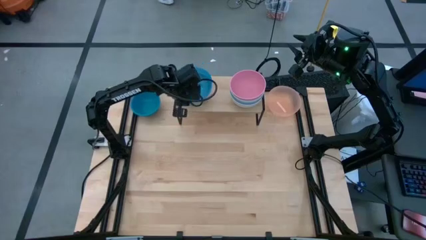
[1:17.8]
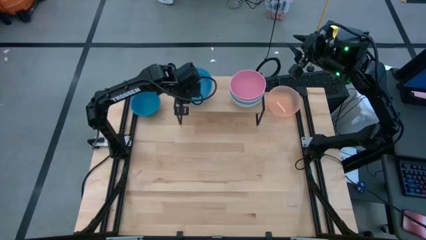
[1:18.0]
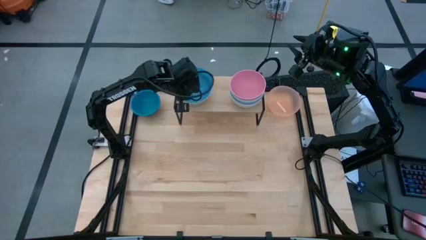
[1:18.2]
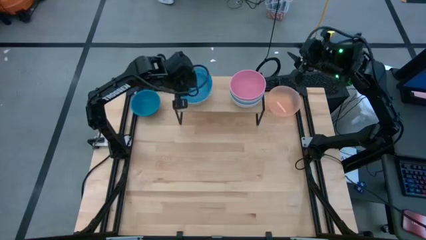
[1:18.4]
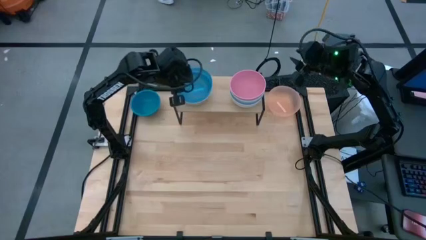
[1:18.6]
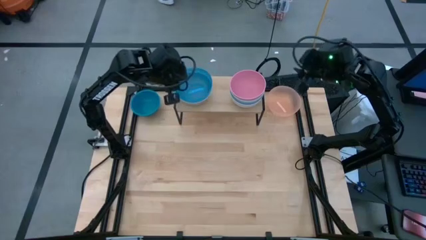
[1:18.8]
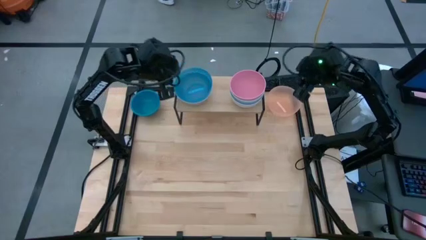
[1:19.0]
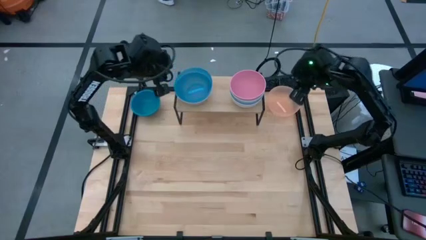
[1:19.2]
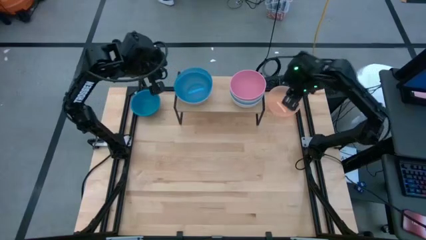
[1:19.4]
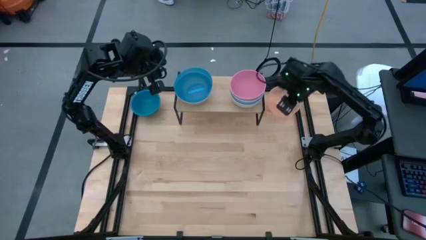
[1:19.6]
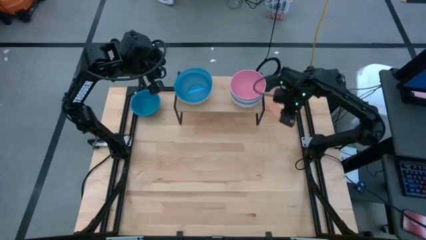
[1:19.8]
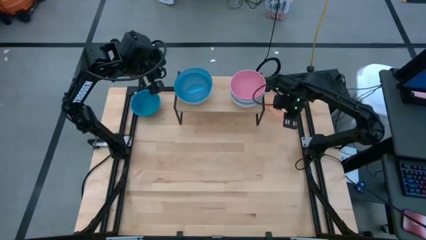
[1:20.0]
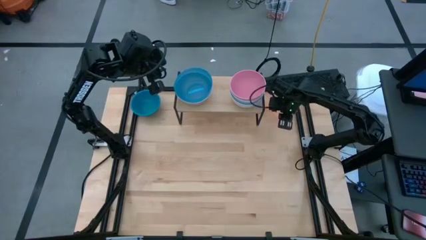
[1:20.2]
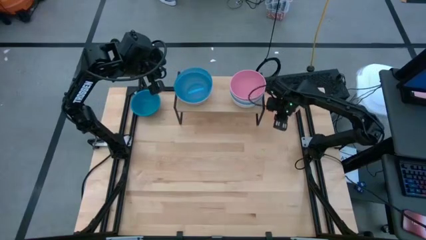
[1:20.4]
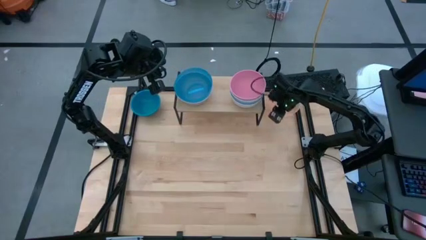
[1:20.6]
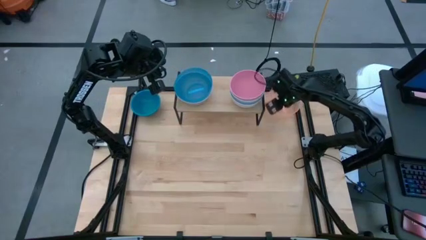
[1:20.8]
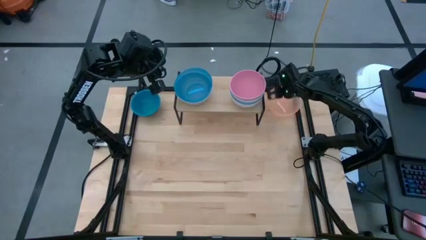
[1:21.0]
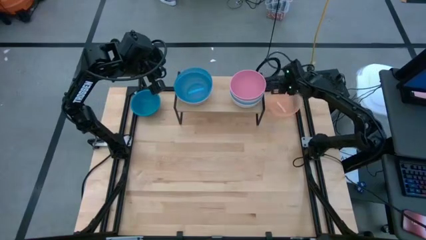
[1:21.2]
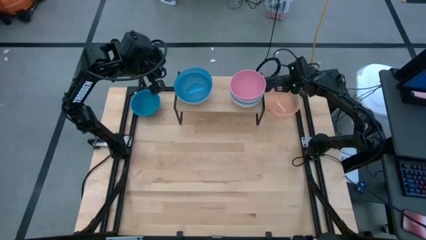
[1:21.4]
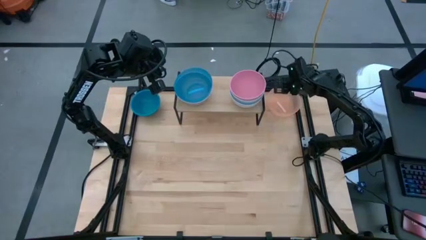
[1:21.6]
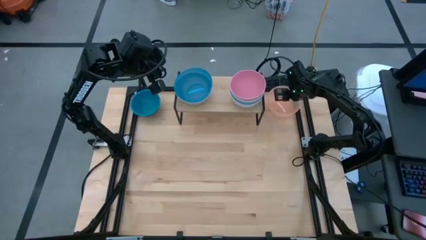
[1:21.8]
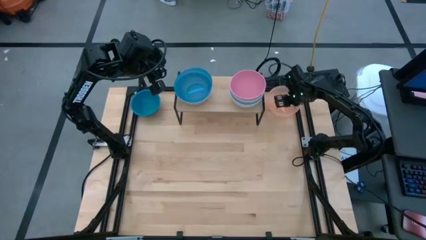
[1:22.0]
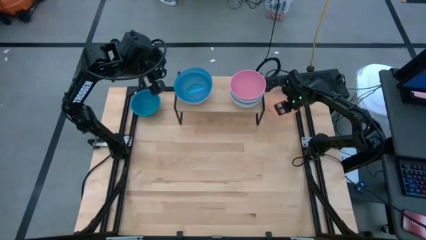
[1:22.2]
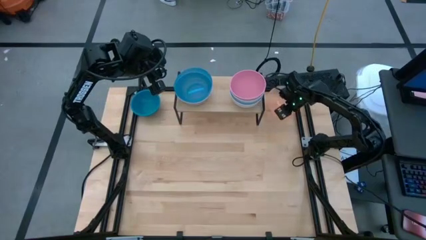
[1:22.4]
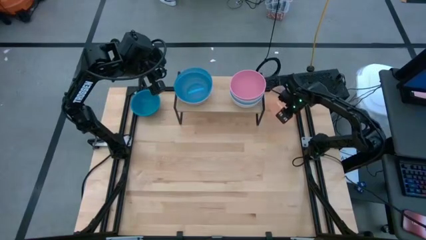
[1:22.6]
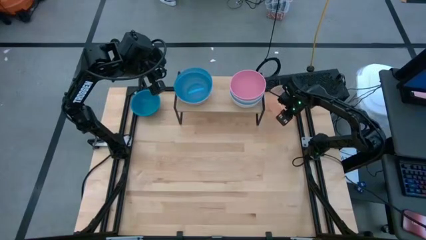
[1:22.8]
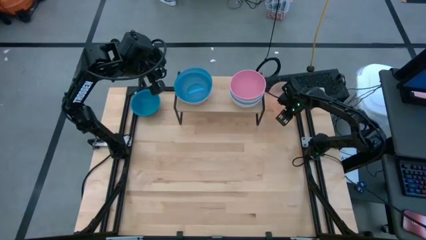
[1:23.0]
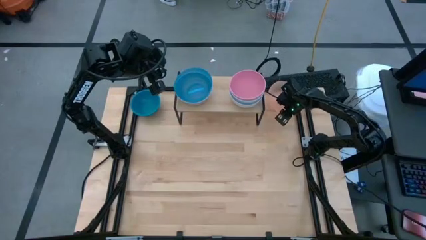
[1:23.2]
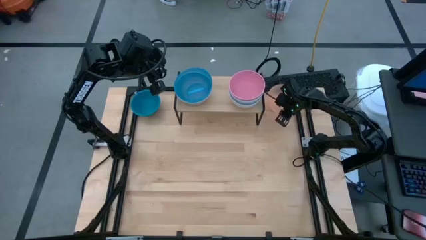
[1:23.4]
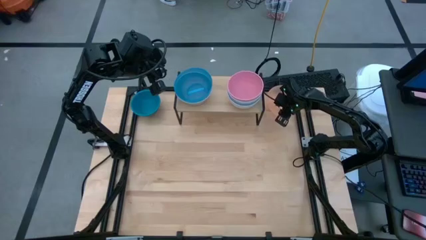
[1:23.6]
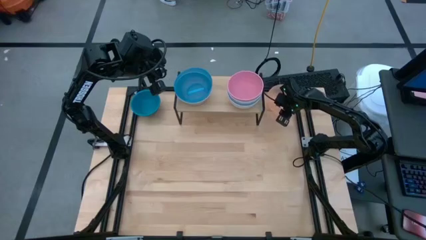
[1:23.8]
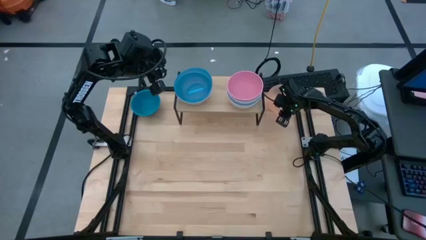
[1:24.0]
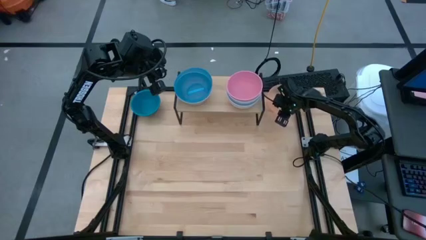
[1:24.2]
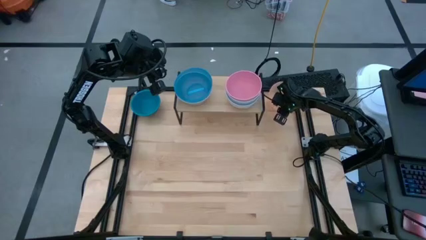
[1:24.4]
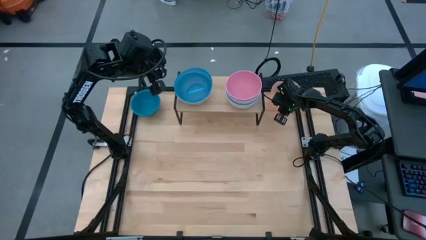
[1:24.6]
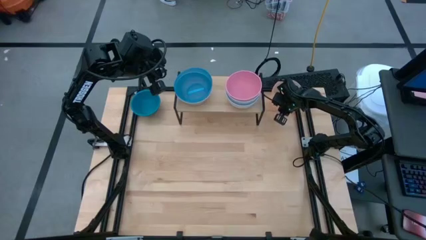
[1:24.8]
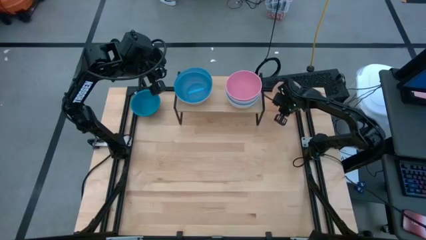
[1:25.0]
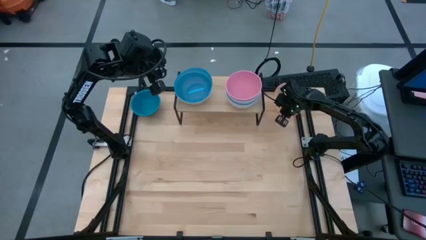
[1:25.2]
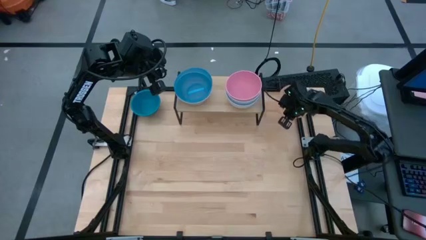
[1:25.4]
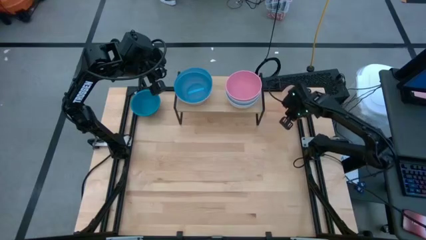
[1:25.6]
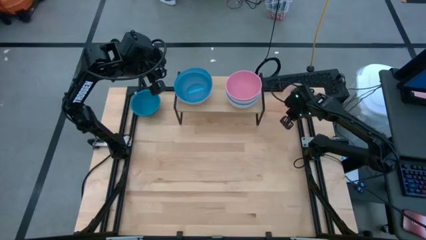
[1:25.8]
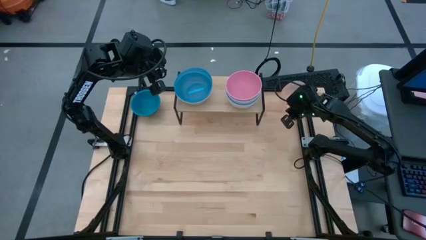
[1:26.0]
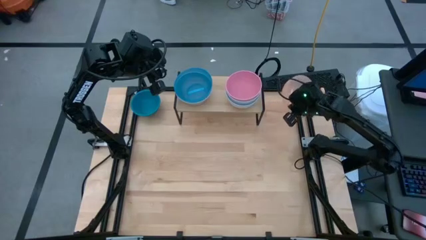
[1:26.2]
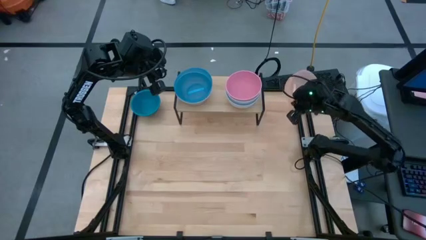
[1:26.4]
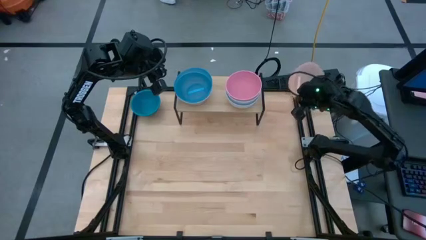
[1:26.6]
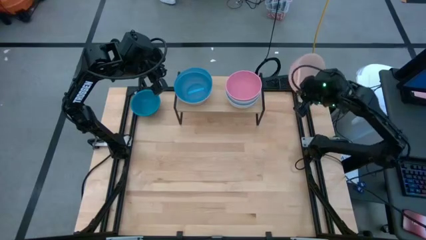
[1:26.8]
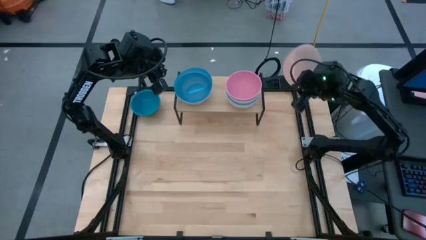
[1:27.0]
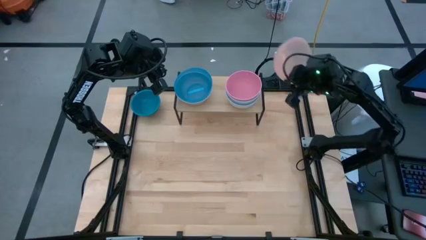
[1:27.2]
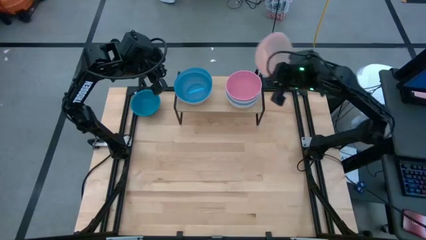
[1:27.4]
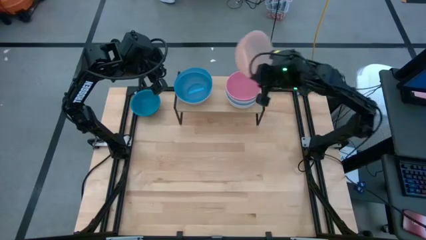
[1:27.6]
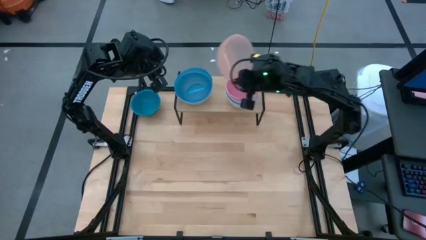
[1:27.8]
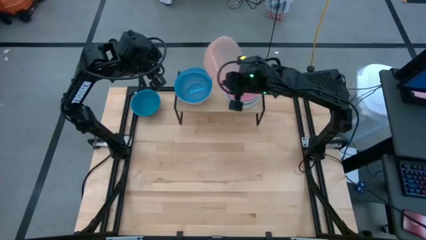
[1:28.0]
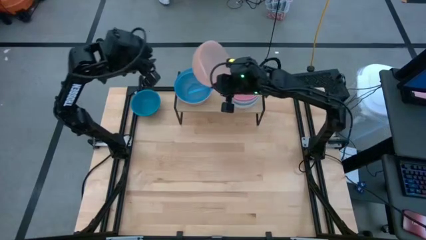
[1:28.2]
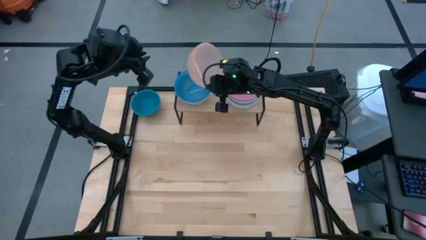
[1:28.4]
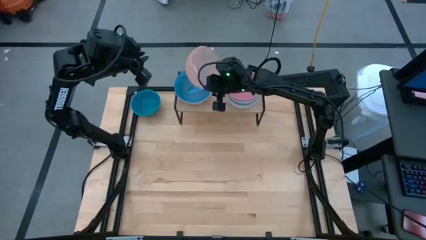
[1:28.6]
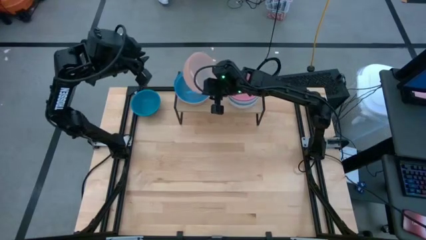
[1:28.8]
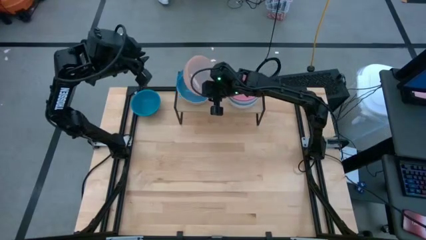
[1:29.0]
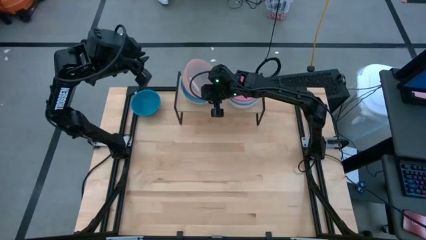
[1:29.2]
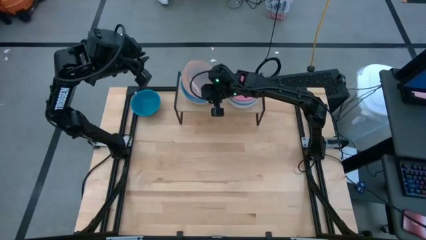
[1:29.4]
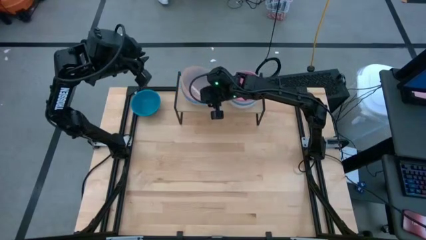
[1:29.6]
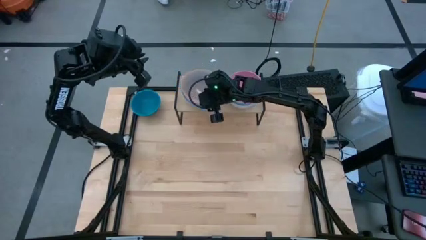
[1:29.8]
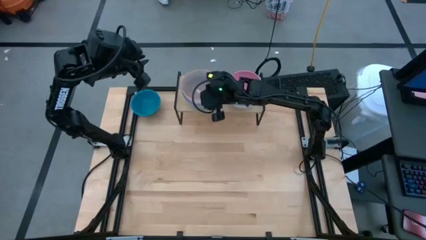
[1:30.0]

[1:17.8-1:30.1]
Task: Place and stack bowls onto a shelf
Stack the light pink bowl on top of the light blue bowl on the shelf

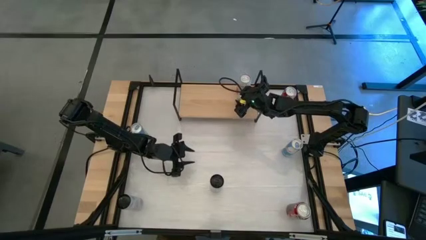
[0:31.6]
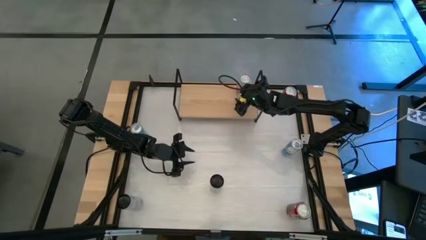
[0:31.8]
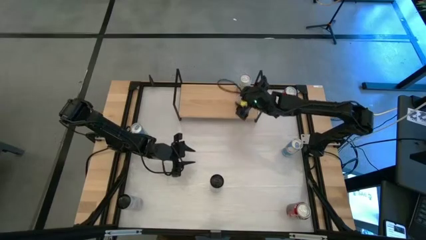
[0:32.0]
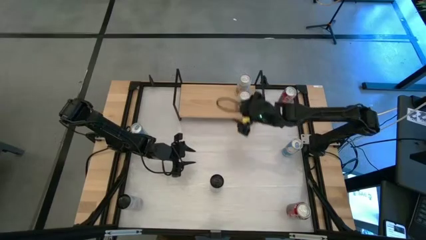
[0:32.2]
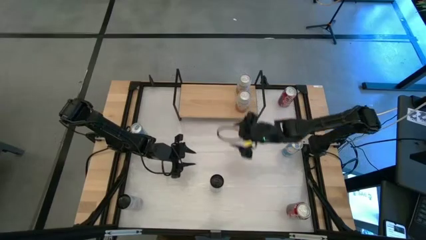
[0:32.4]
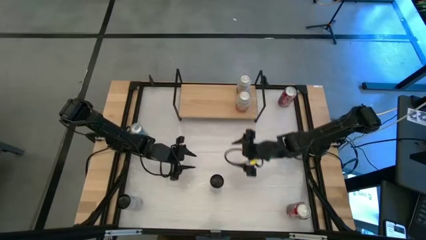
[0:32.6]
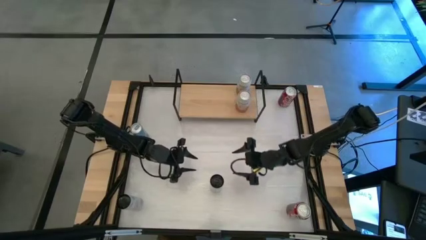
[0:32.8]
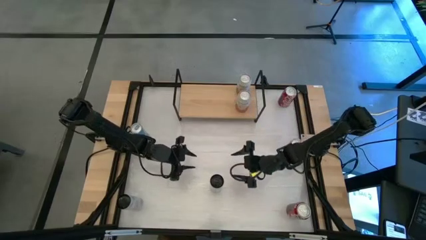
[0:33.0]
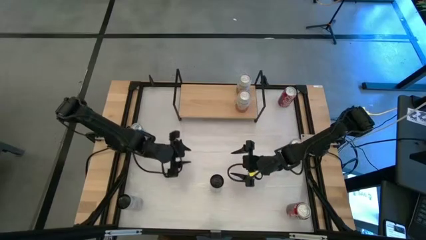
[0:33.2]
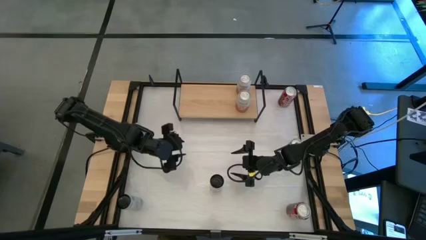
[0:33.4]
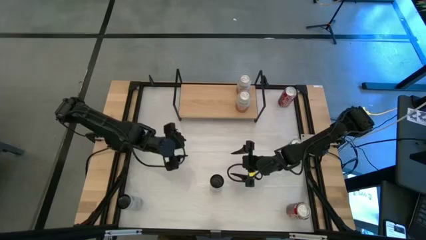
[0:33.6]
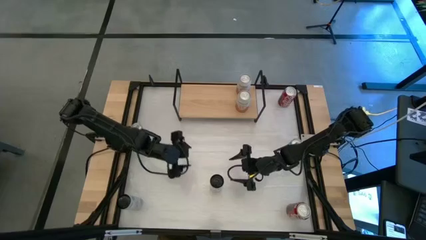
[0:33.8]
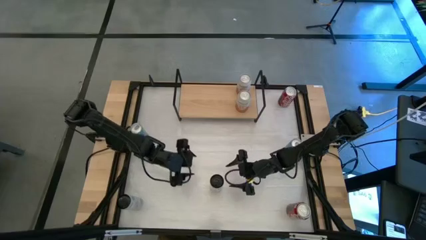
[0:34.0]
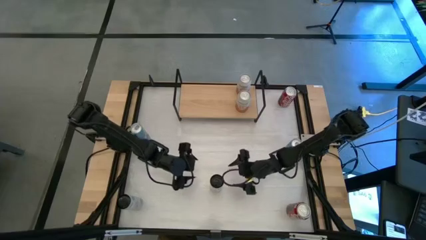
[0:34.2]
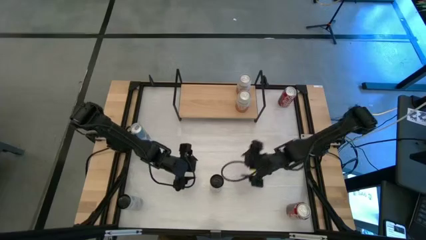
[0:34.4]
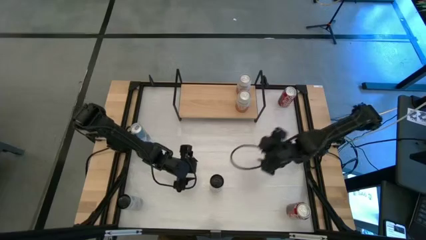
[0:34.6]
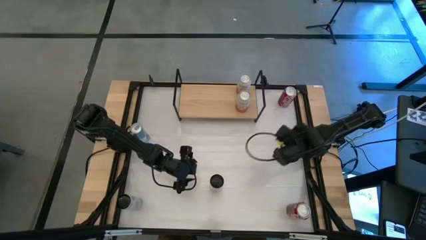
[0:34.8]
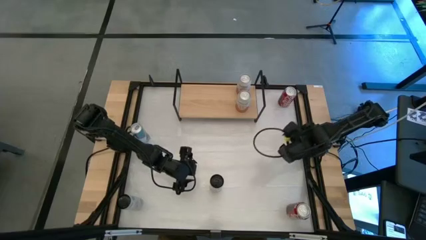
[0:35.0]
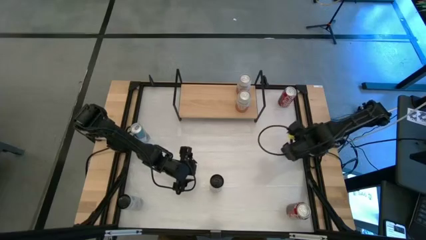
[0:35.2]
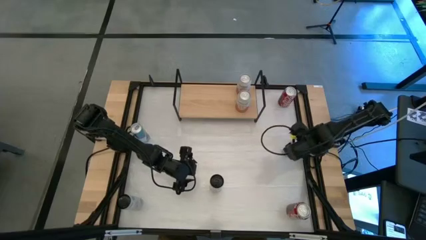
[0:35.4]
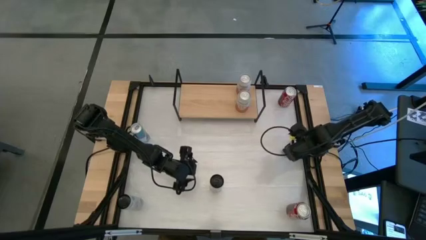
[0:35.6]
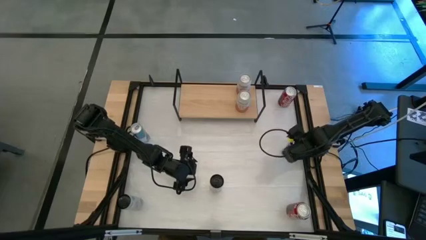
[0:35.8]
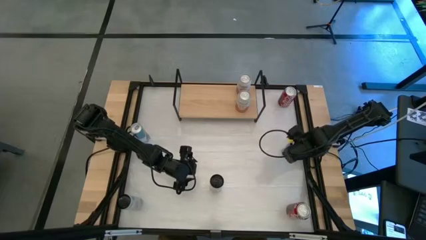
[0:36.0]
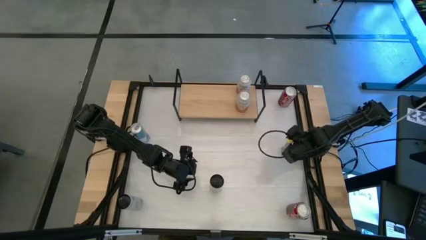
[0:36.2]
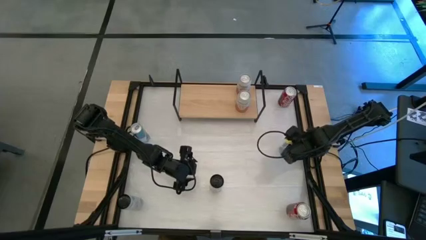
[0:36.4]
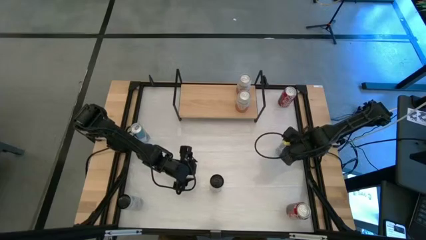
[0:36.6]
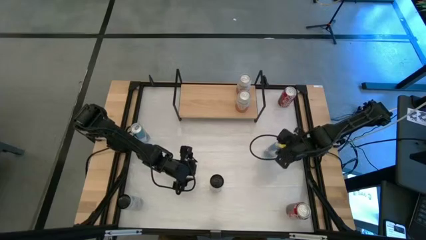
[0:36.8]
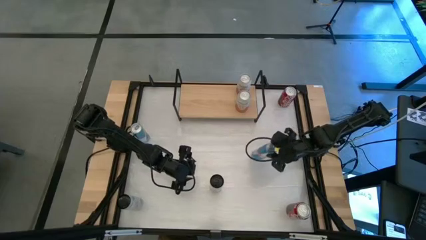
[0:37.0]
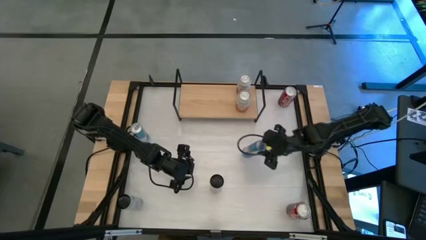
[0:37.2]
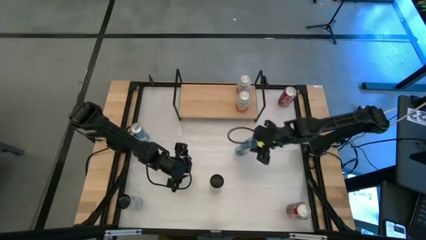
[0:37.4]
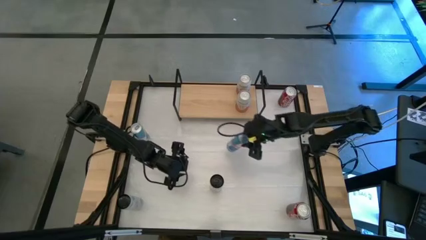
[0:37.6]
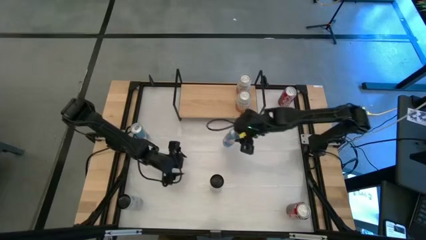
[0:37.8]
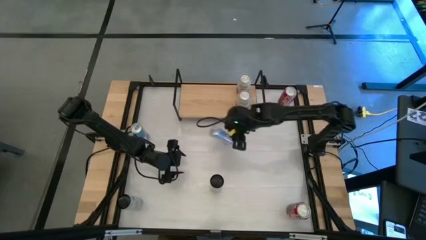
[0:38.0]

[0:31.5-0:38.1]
Task: Place canned beverage on shelf
Put the right blue soda can on the shelf
